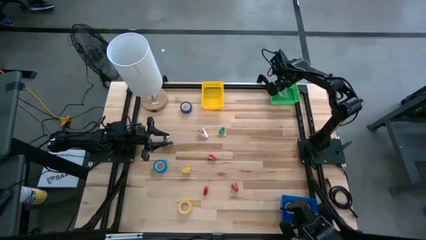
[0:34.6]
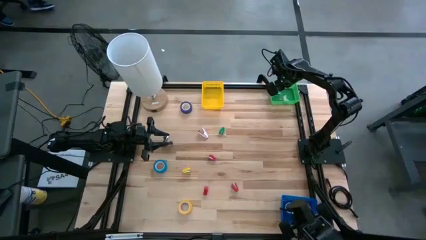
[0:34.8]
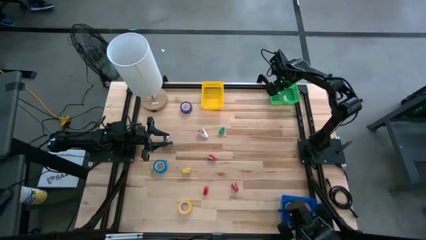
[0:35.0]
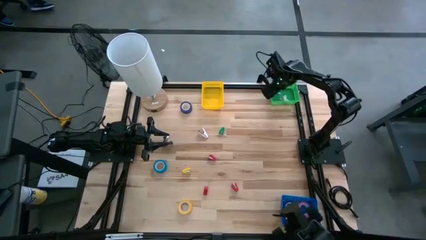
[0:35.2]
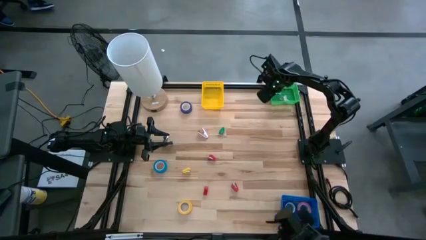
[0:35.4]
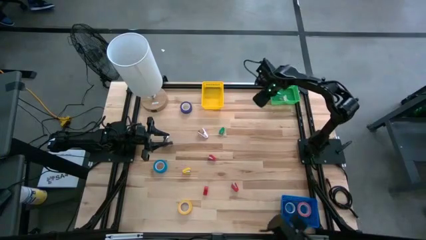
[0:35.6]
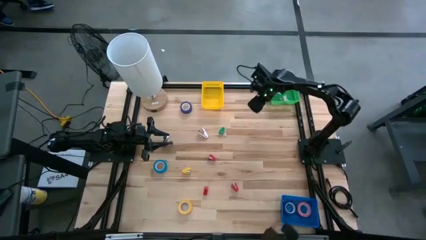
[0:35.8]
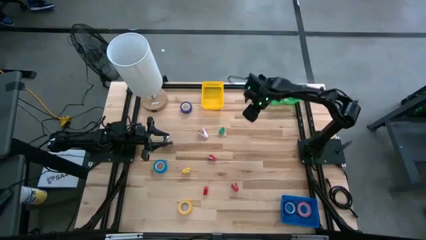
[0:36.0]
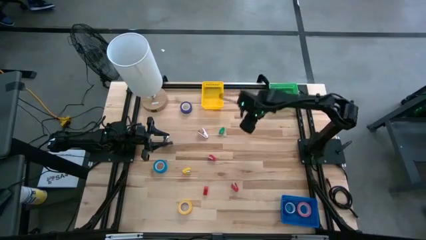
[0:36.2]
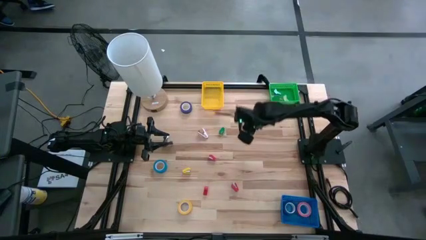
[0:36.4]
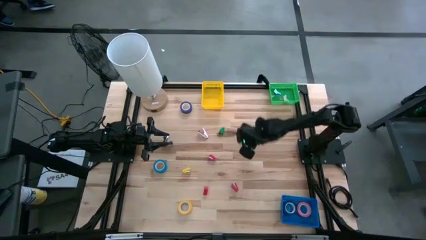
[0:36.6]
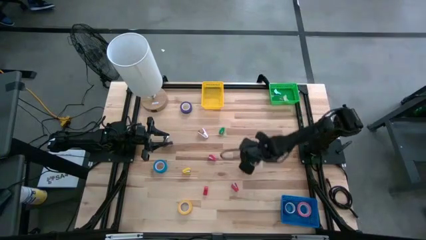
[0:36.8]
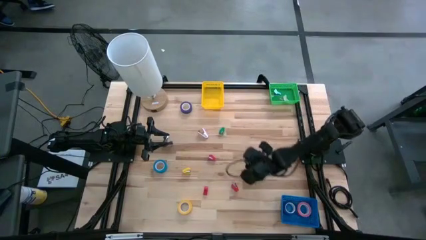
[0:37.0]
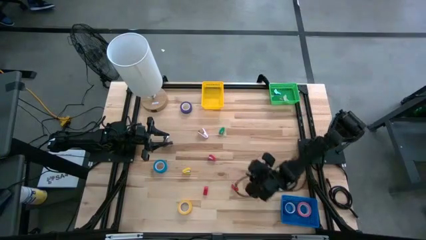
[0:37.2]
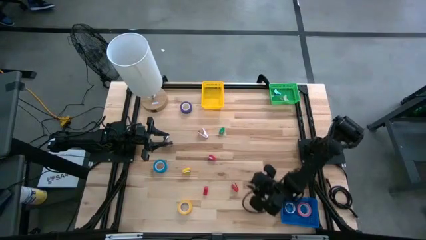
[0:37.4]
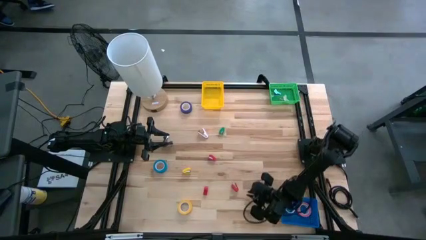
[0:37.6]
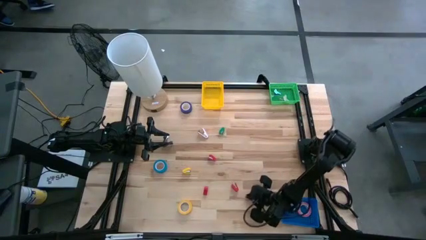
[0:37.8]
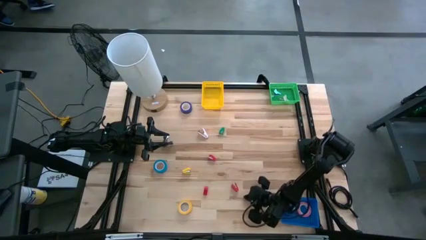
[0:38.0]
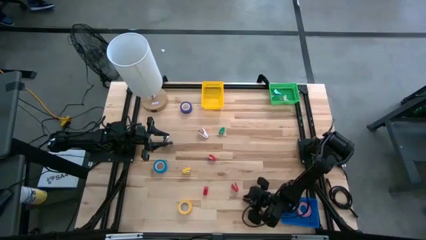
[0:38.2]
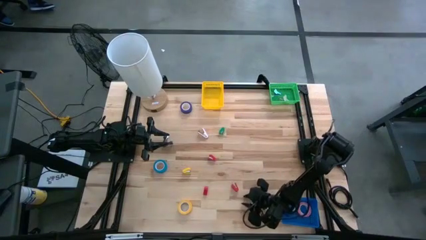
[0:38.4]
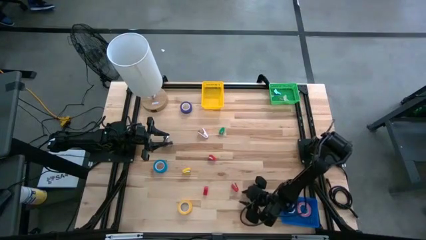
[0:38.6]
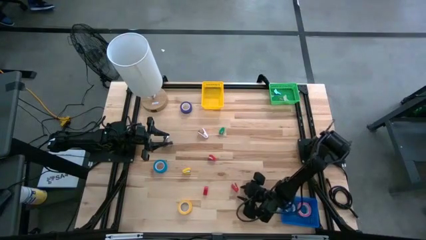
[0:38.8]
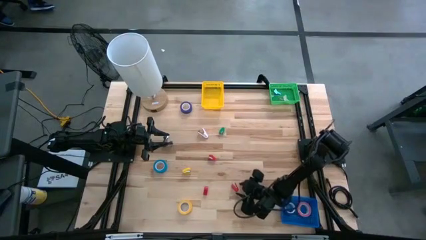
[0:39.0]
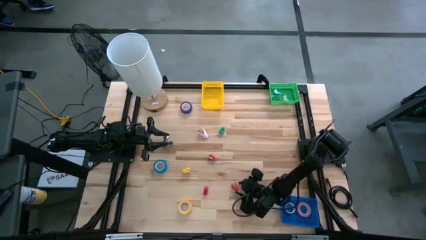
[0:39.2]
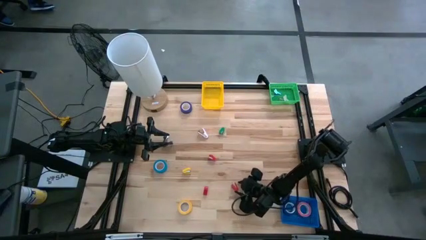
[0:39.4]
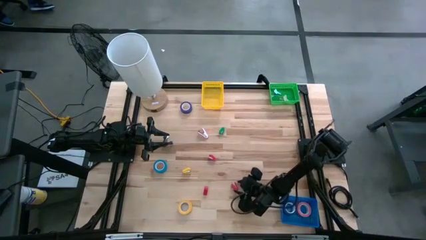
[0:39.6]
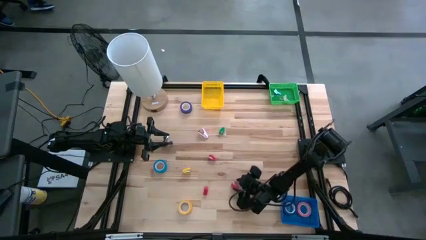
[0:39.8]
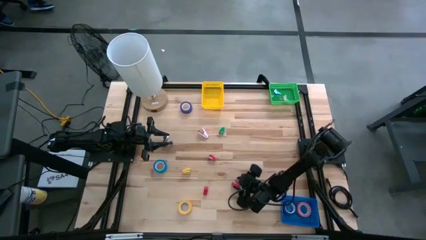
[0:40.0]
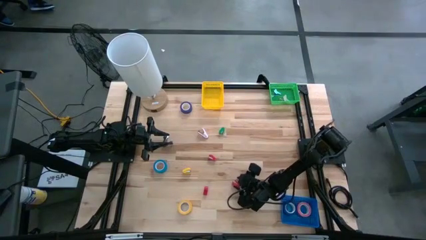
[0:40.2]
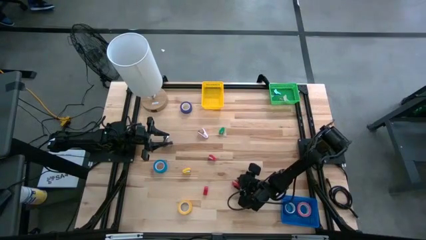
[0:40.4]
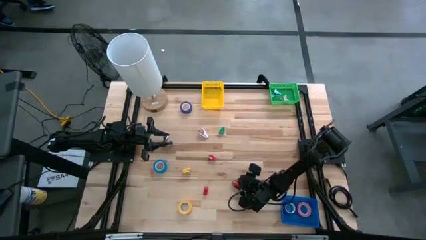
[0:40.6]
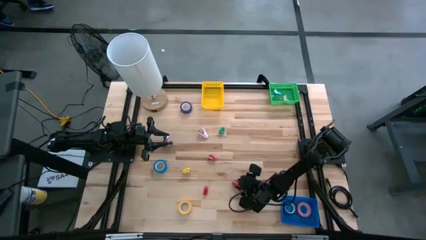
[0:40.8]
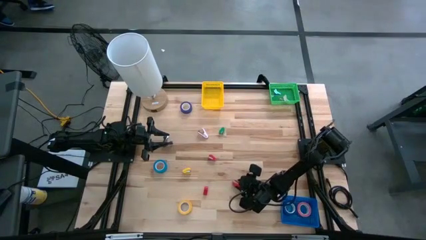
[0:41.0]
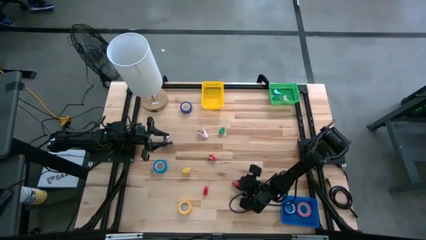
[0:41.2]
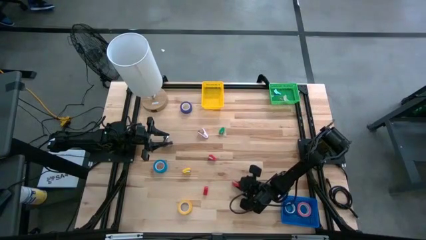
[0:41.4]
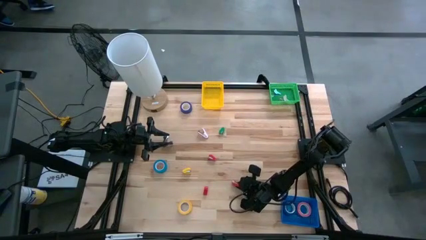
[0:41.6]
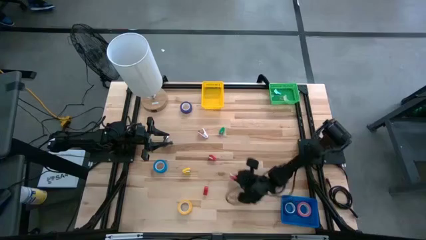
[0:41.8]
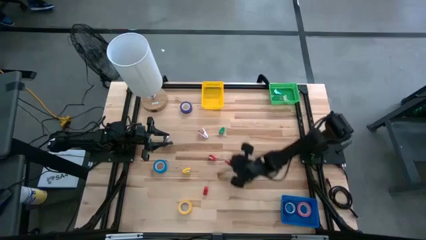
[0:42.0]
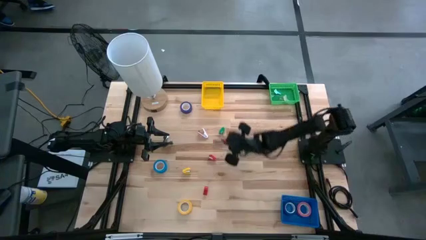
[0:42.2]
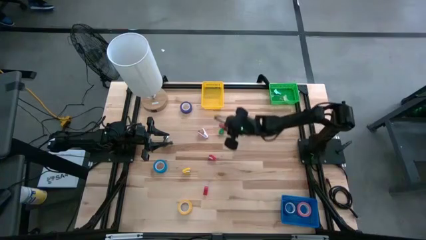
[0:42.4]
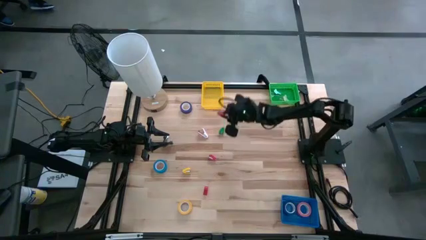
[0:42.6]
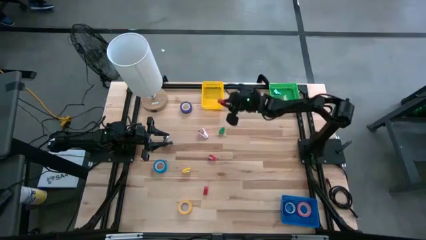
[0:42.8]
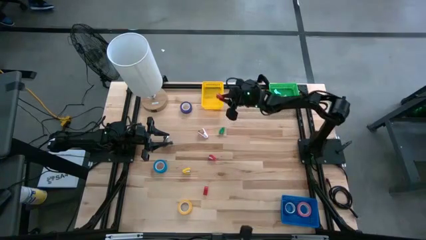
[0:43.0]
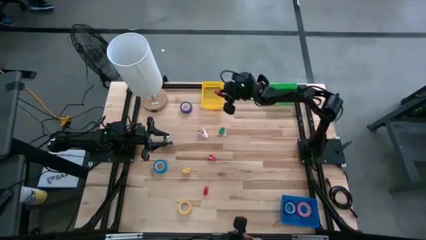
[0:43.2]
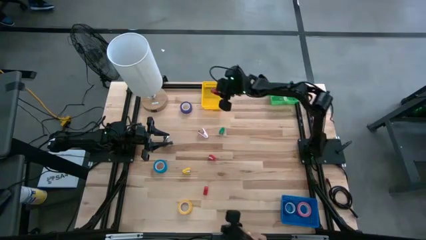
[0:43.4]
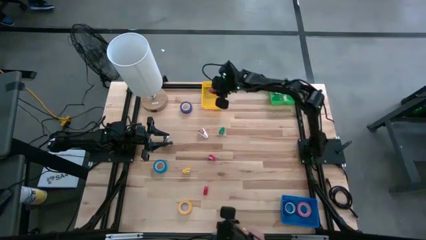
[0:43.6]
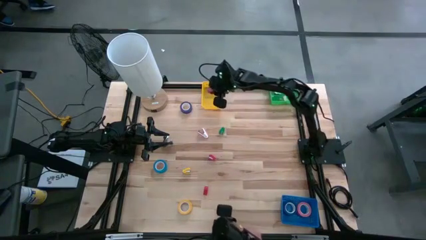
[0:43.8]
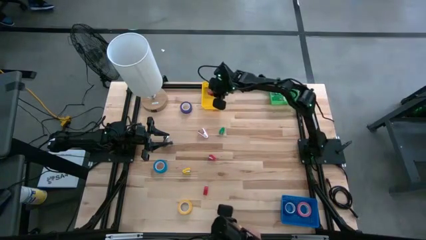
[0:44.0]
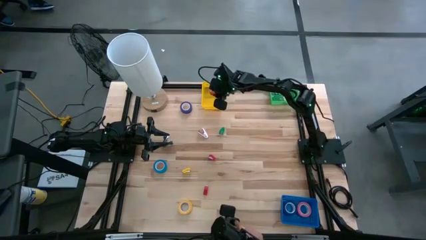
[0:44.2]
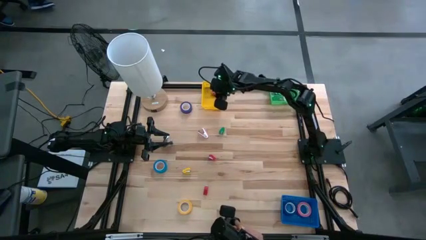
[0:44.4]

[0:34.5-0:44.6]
Task: Pick and place Stapler, Stapler remover, tape
Put the right red stapler into the yellow bin

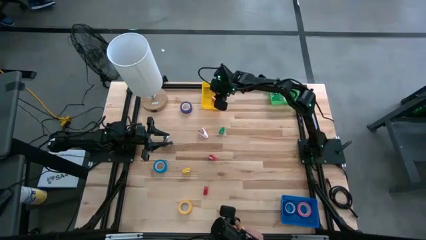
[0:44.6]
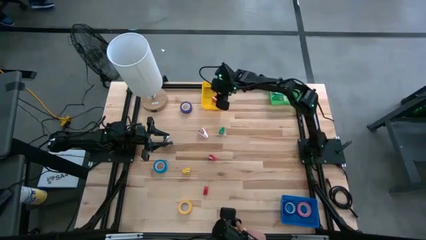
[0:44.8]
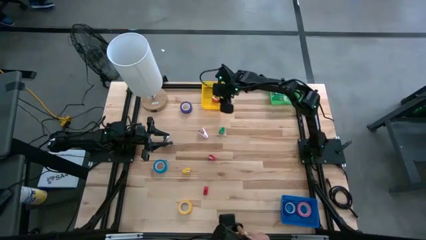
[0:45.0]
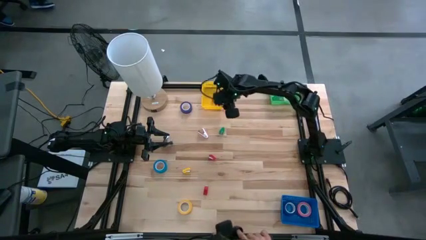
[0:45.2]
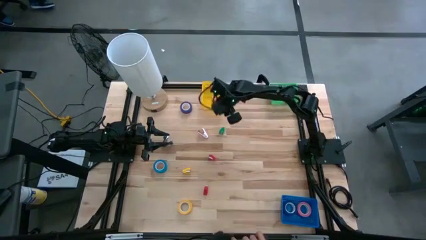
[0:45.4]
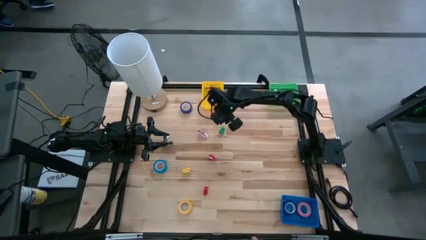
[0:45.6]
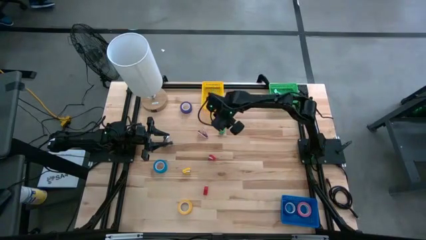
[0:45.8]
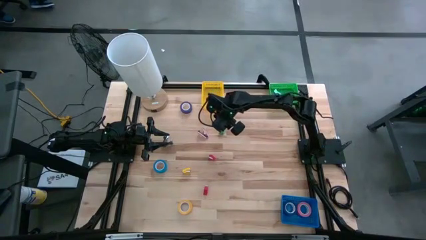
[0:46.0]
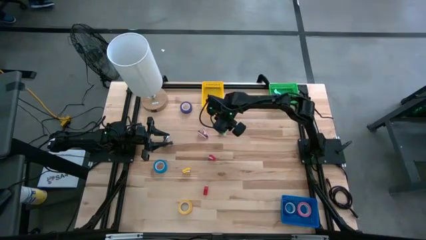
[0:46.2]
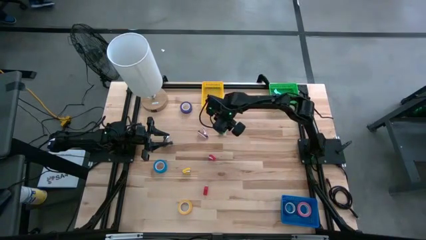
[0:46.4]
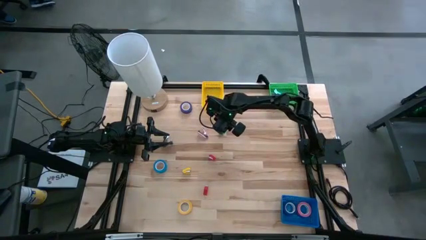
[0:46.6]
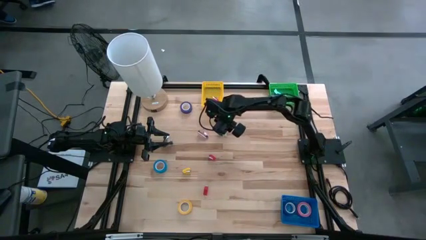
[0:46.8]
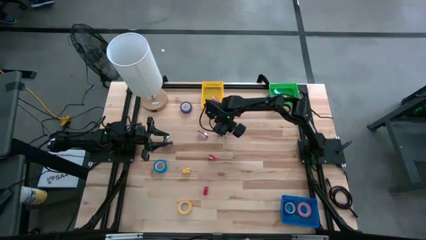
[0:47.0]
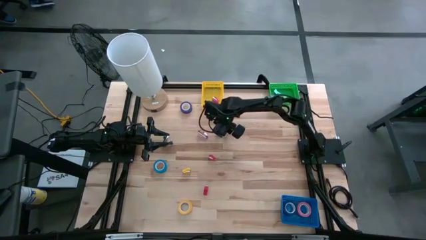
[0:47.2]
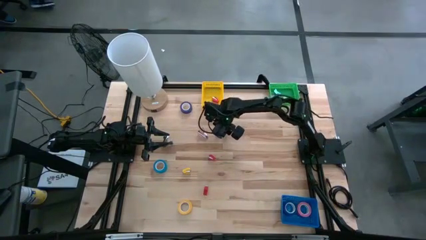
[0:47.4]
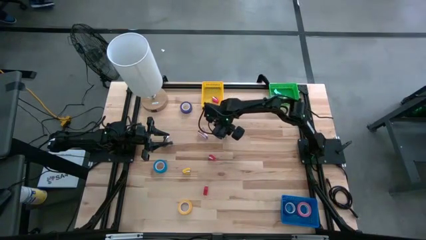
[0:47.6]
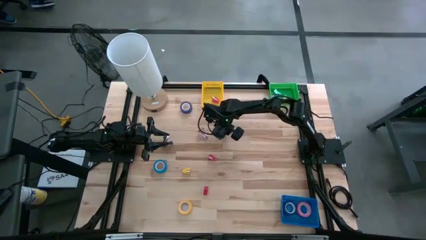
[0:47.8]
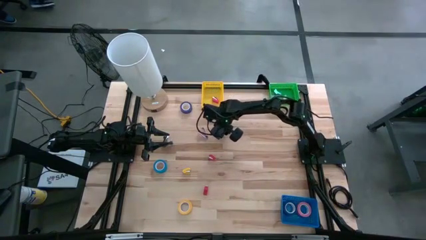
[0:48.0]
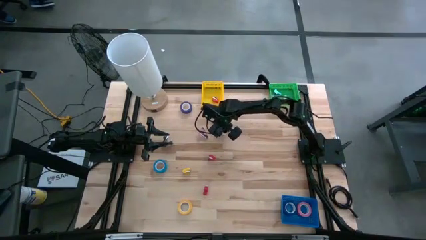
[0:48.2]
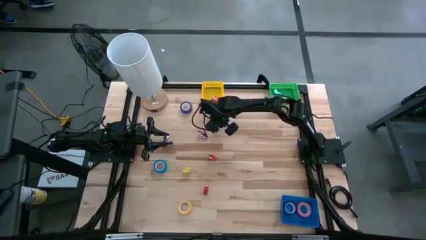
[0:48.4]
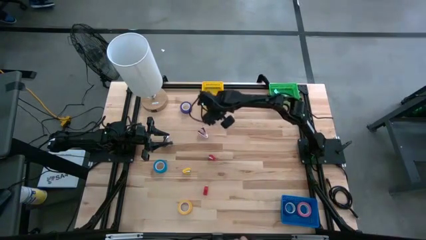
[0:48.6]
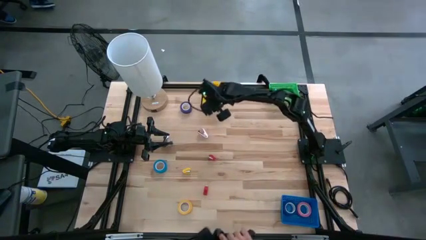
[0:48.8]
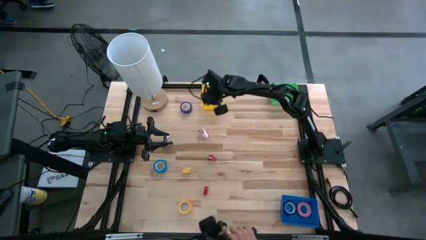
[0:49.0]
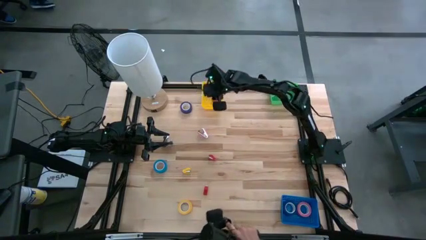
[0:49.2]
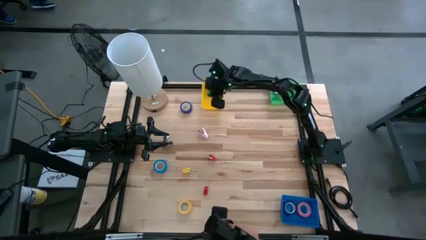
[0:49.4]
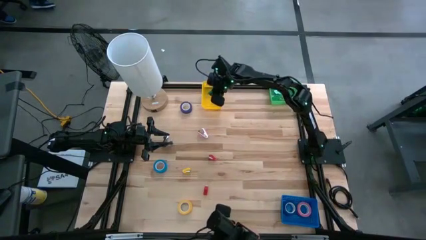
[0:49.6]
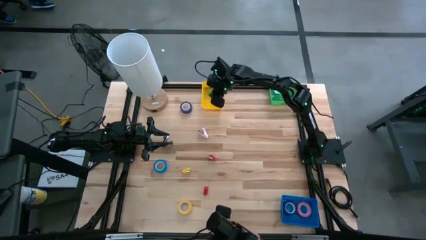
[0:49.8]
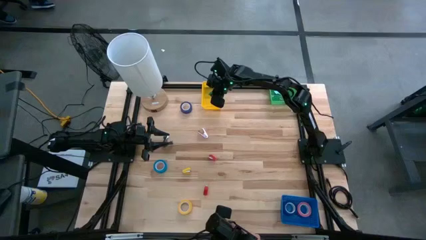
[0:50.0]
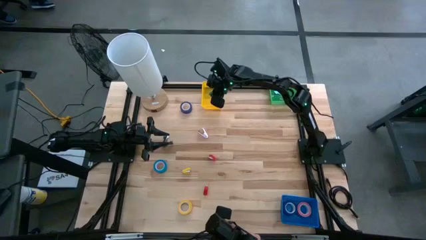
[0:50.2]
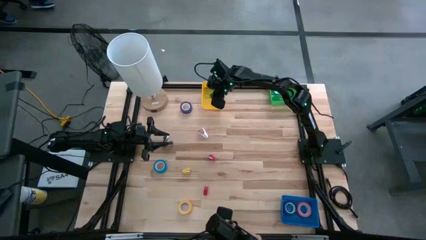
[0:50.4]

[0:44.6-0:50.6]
Put the green stapler into the yellow bin

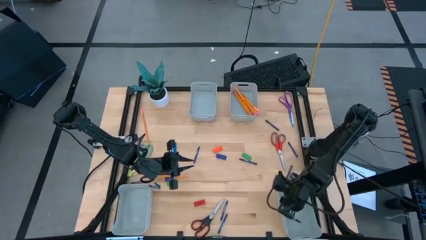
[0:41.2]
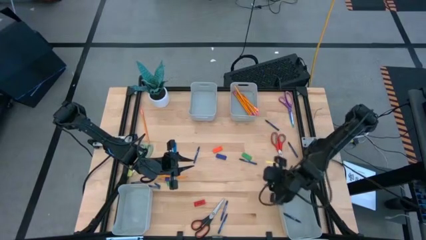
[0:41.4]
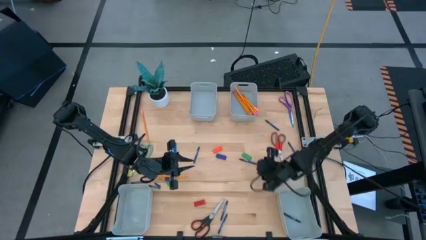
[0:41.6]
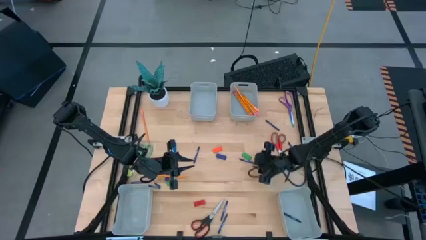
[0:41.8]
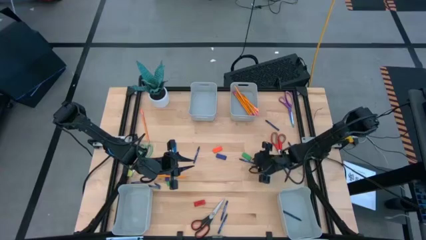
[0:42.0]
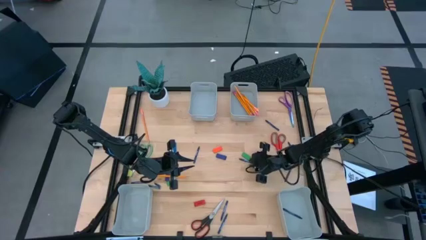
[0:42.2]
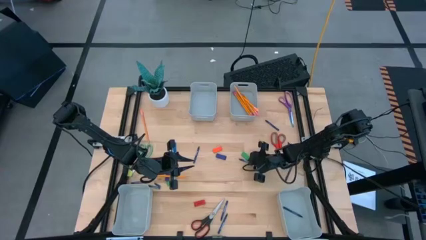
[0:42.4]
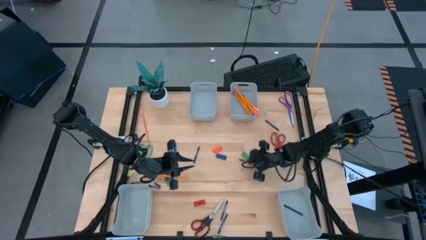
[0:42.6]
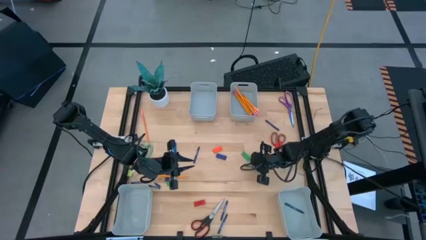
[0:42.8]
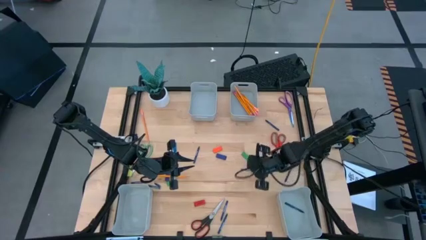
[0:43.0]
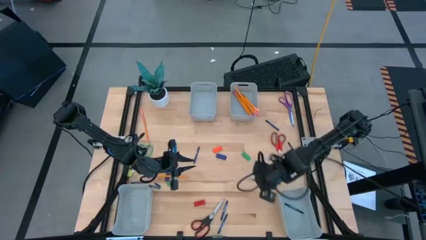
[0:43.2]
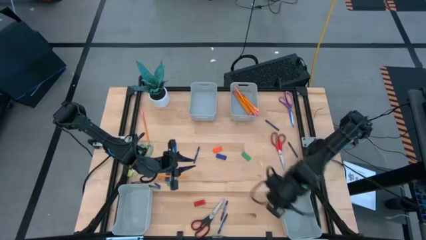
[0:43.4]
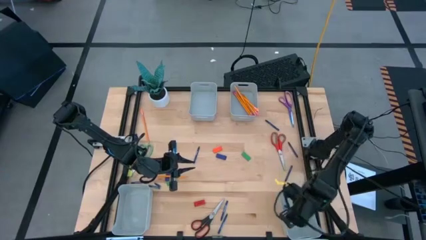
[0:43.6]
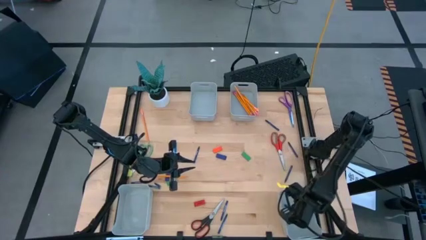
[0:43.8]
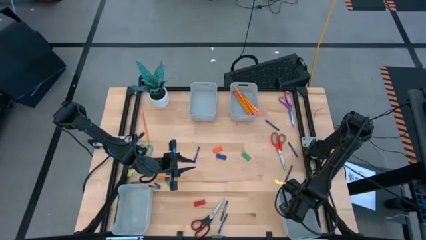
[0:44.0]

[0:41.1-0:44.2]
Task: Sort crayons/erasers/pens/pencils in bins
Put the blue crayon into the bottom right bin
